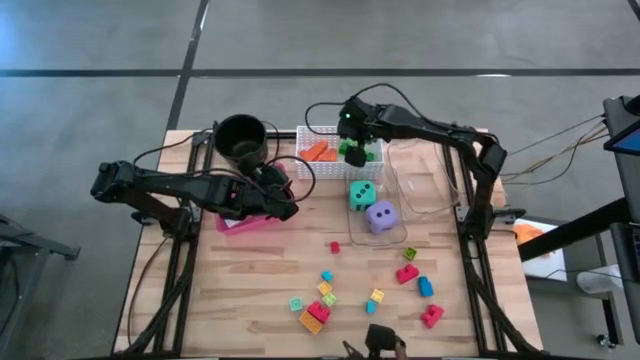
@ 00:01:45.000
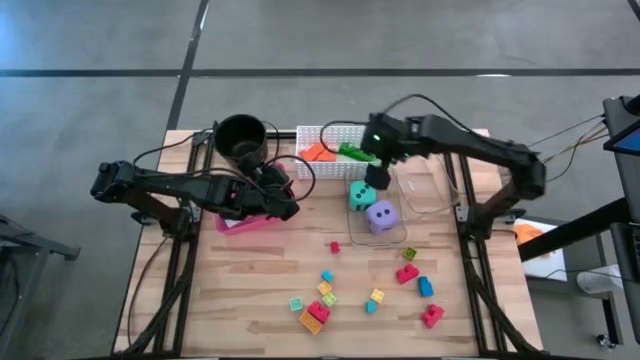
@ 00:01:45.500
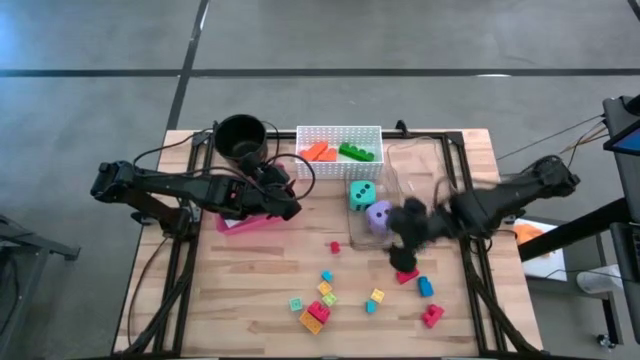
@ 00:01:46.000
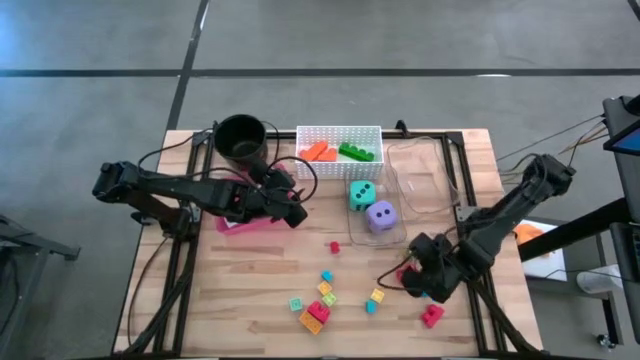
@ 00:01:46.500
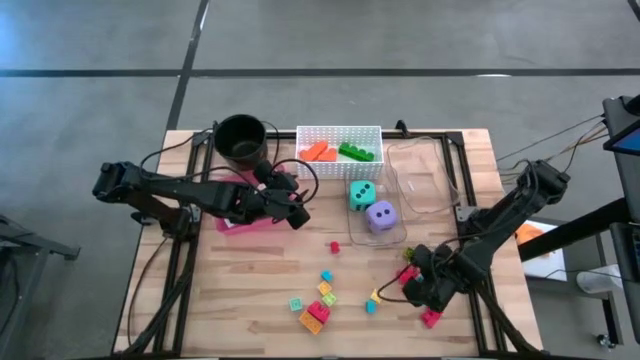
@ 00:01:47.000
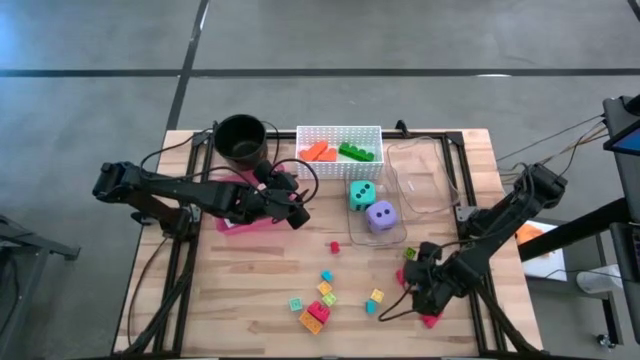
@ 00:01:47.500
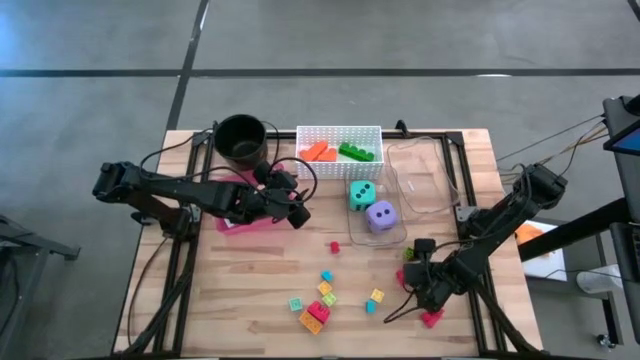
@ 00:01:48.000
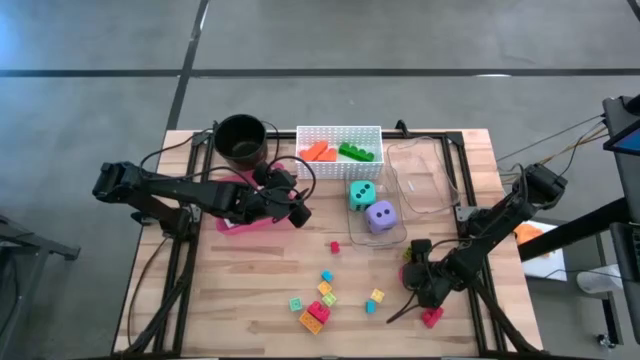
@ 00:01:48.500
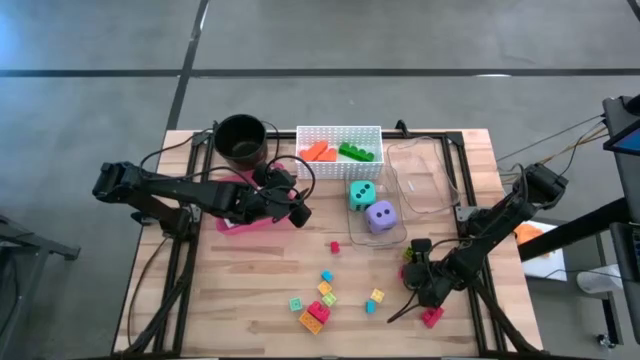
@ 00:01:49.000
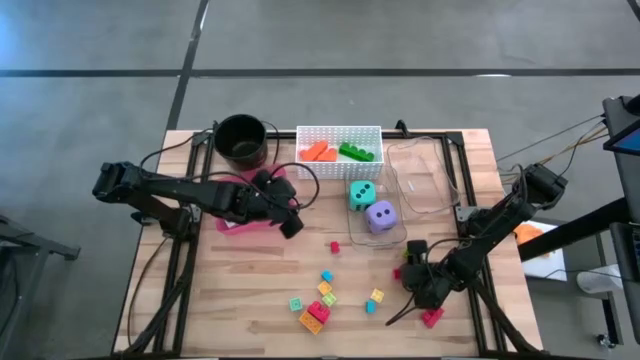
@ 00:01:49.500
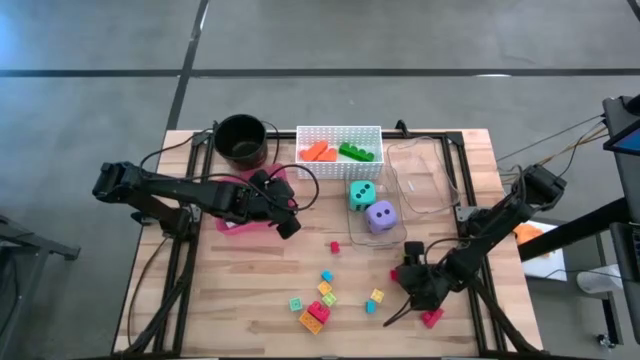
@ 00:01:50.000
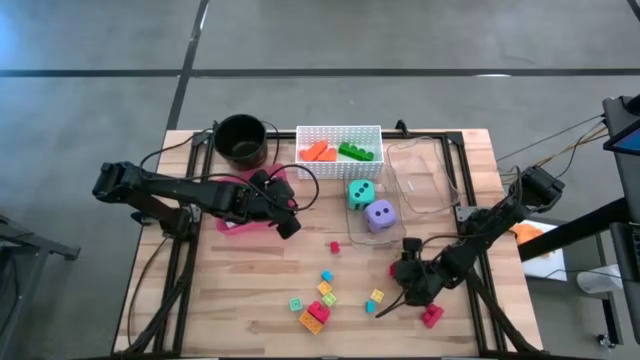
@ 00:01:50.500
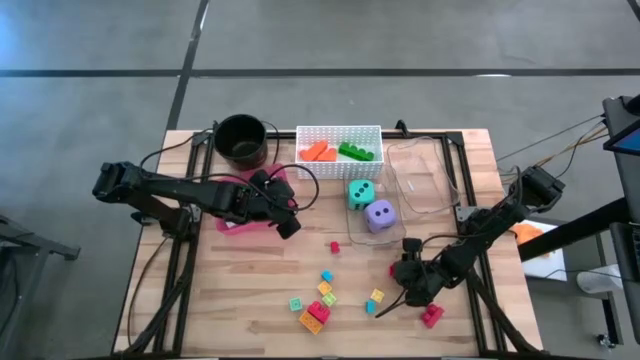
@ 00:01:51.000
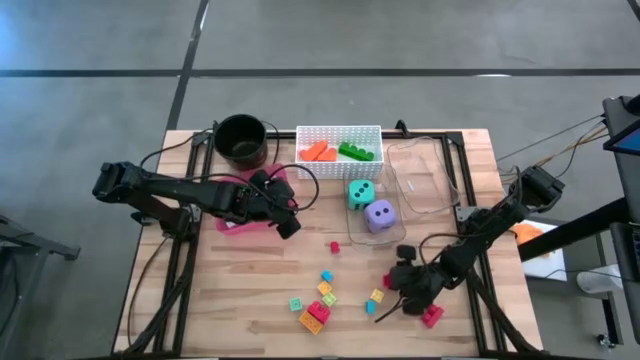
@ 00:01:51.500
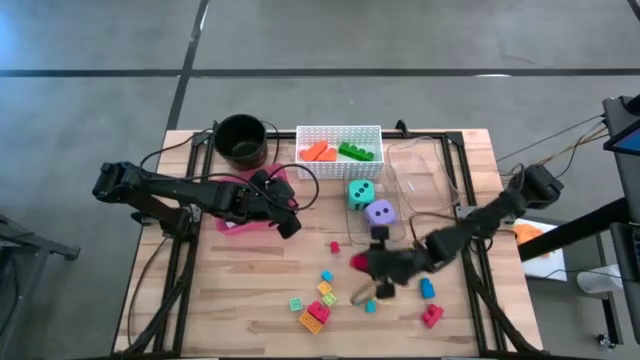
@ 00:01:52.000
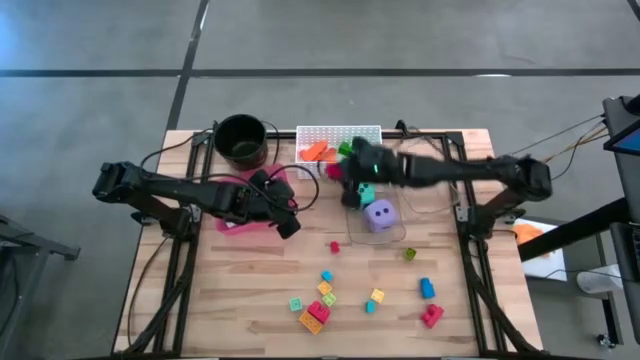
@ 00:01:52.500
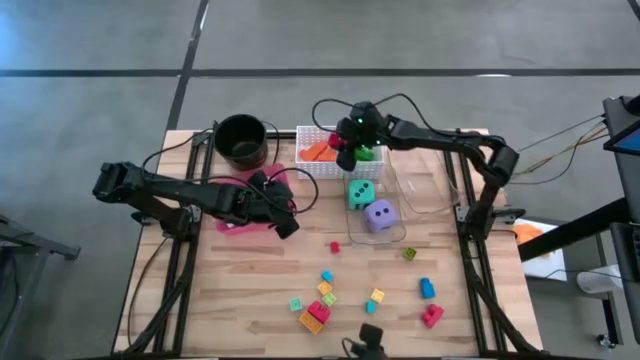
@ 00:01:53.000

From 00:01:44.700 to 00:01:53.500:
Task: Pick & Place Toys
Put the top big red game piece into the white bin

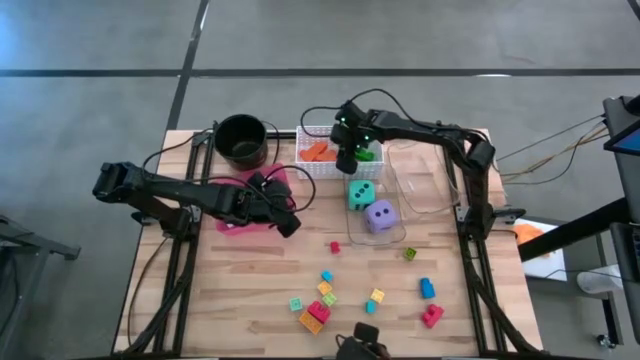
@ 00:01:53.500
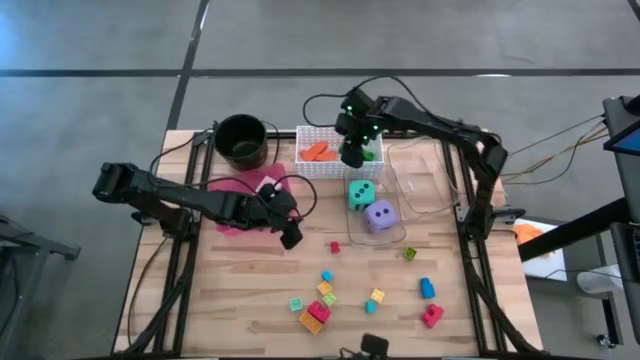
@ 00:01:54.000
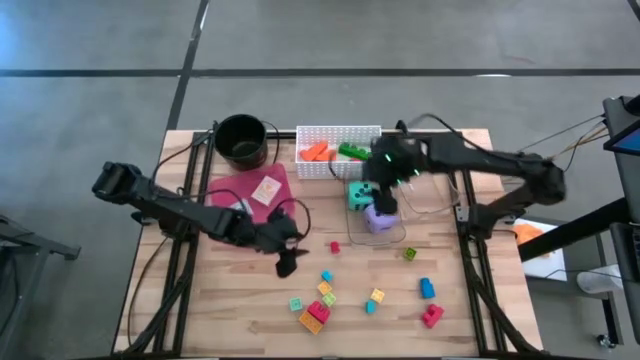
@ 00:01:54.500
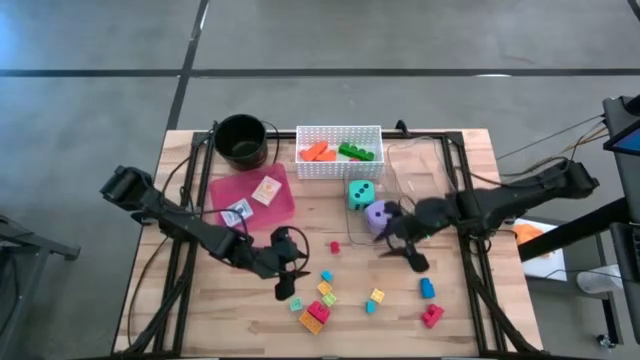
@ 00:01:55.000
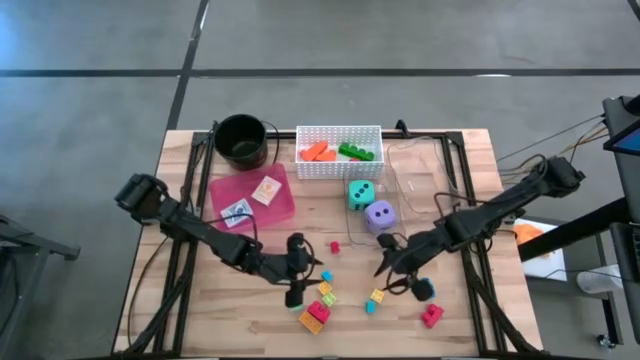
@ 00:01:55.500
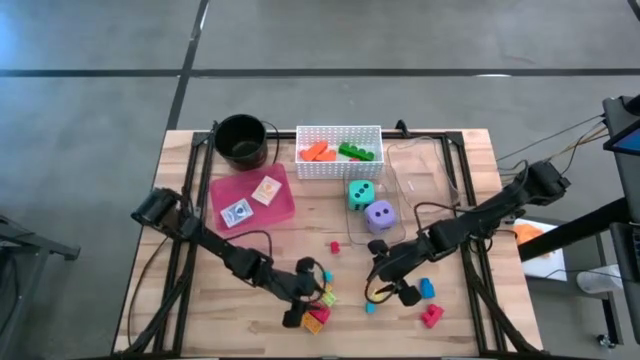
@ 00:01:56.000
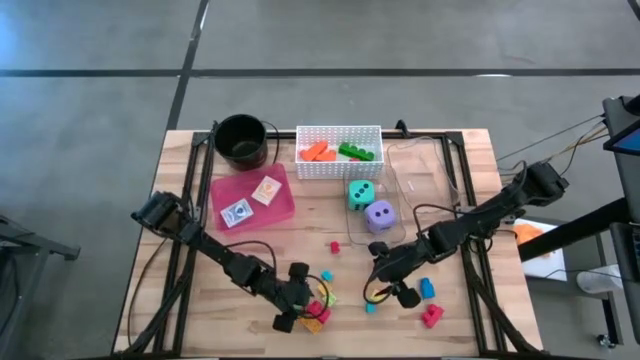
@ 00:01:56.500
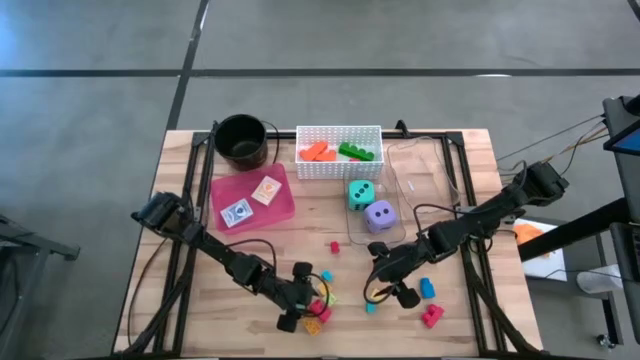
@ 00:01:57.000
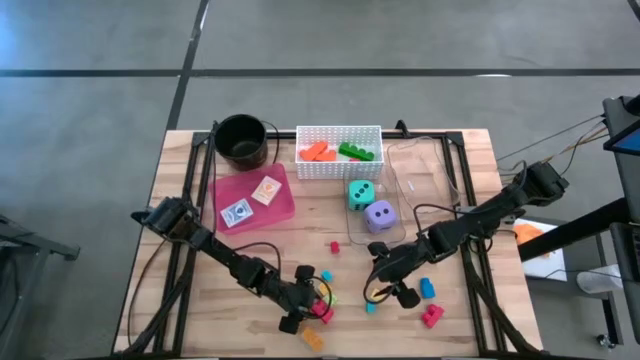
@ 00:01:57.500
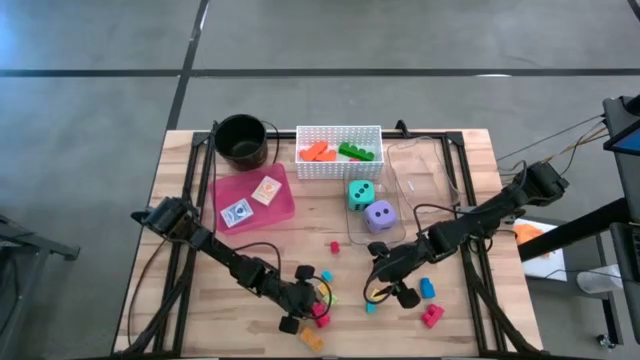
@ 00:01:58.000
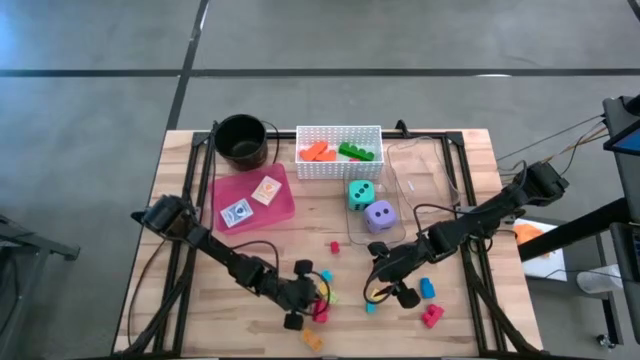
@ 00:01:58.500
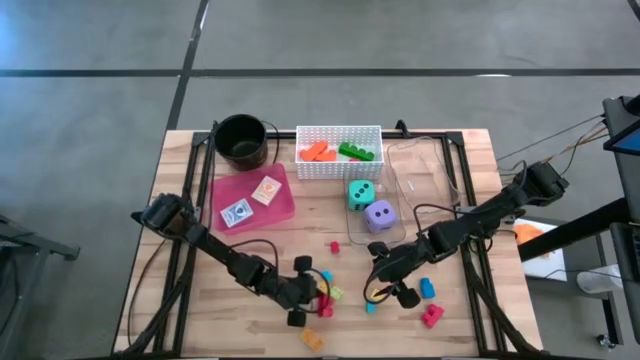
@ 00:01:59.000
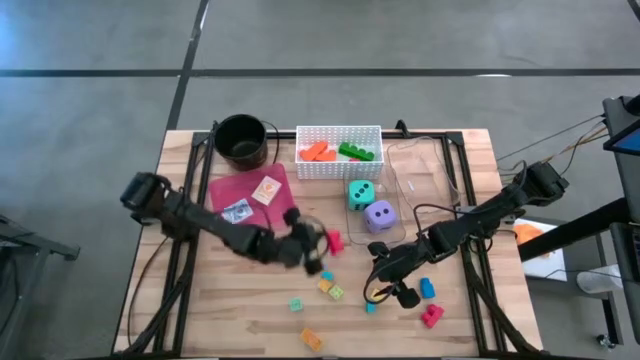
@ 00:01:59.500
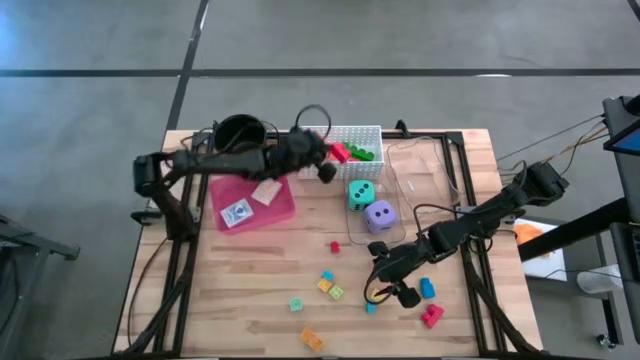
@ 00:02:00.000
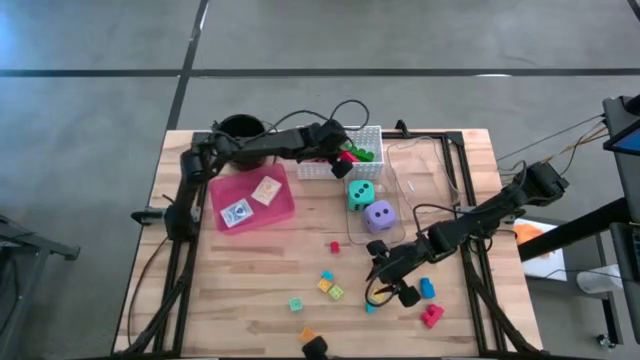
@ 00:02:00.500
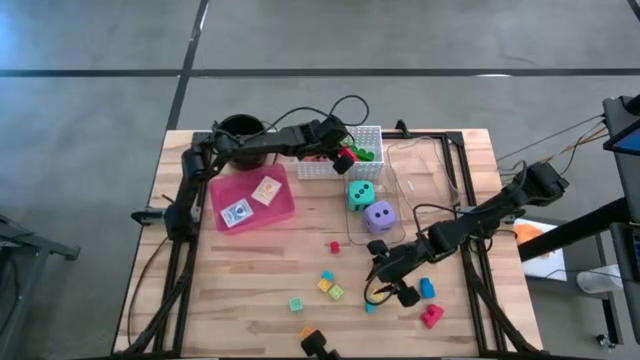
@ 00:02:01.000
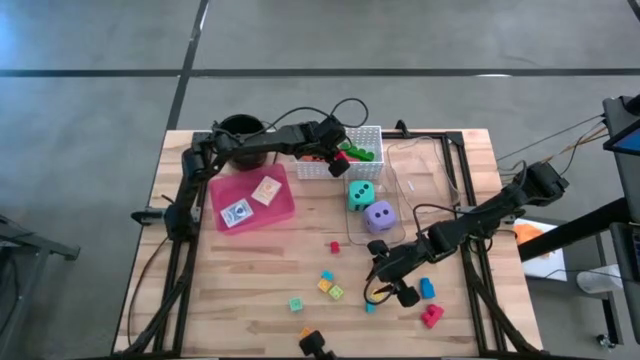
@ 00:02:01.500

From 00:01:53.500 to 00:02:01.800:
Put the left big red game piece into the white bin
